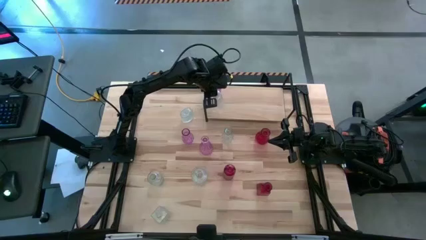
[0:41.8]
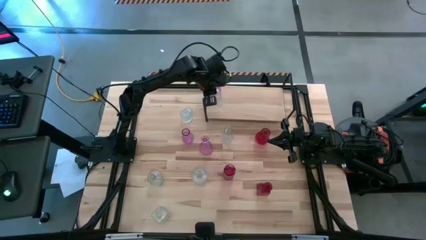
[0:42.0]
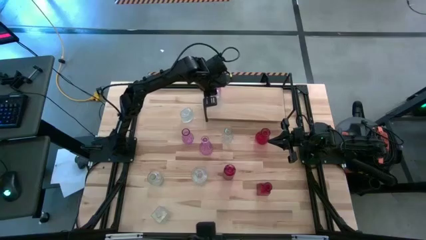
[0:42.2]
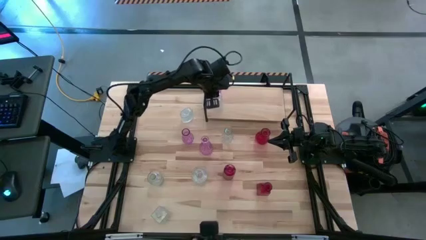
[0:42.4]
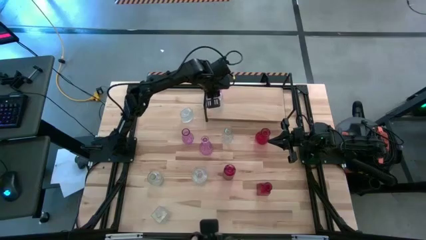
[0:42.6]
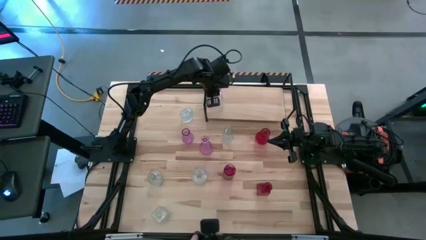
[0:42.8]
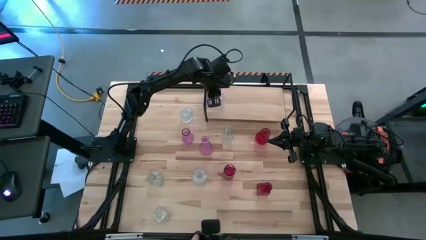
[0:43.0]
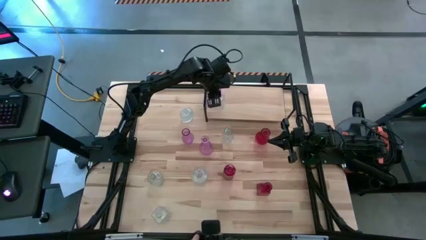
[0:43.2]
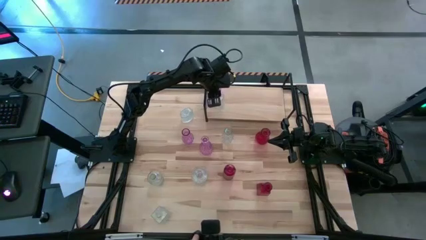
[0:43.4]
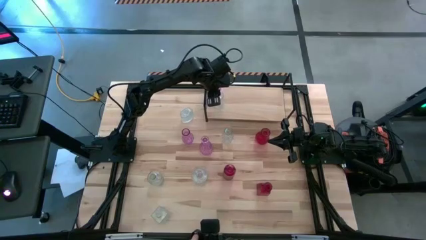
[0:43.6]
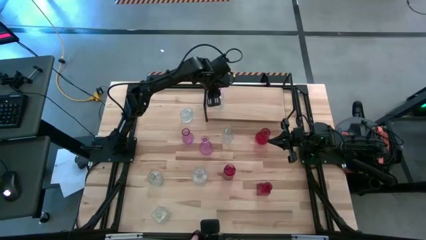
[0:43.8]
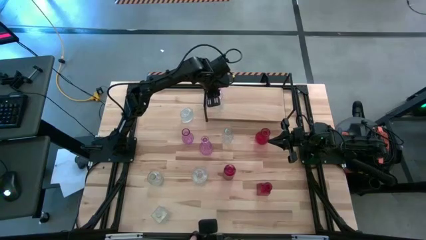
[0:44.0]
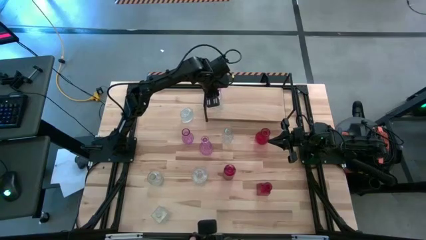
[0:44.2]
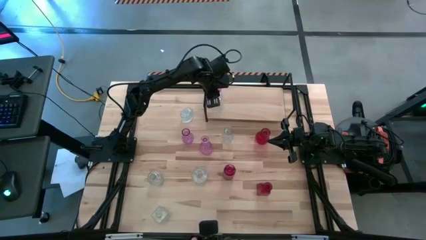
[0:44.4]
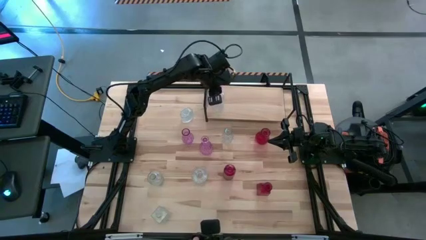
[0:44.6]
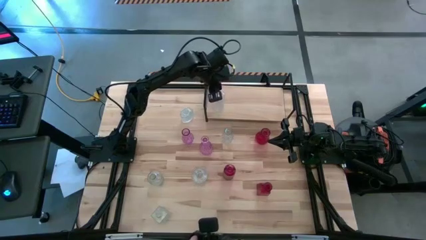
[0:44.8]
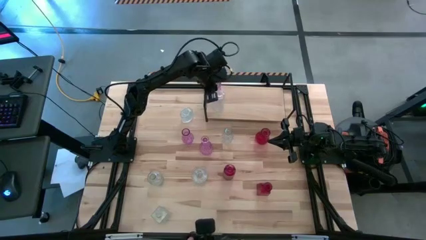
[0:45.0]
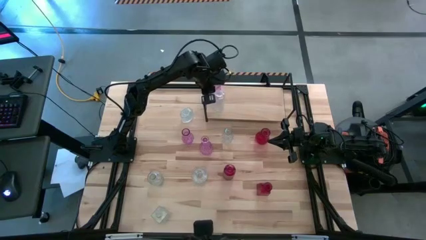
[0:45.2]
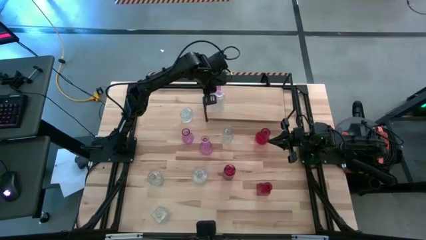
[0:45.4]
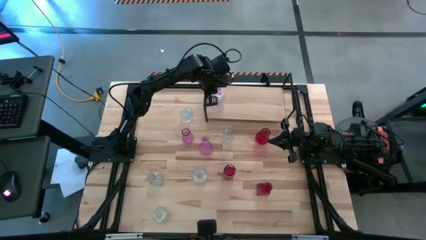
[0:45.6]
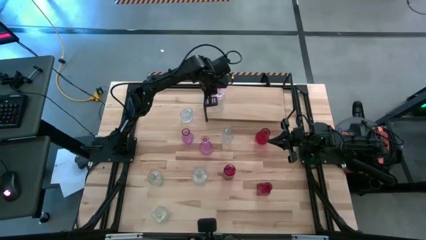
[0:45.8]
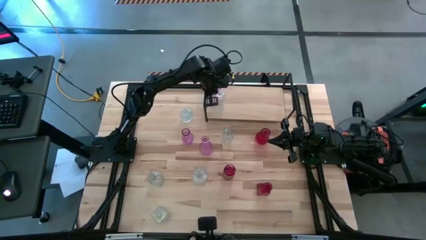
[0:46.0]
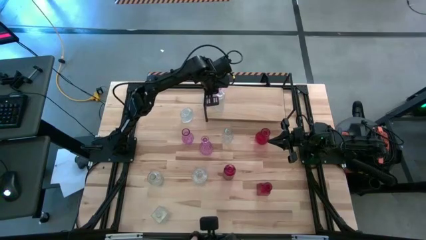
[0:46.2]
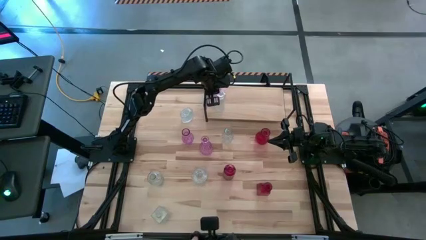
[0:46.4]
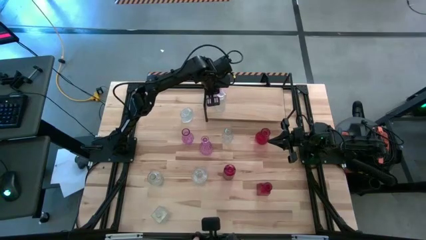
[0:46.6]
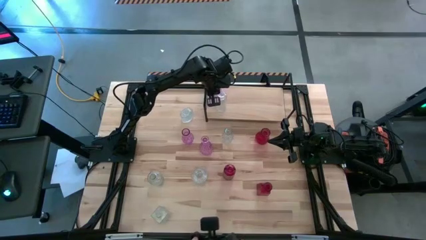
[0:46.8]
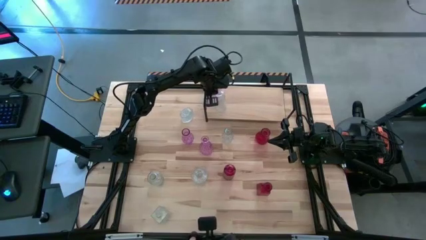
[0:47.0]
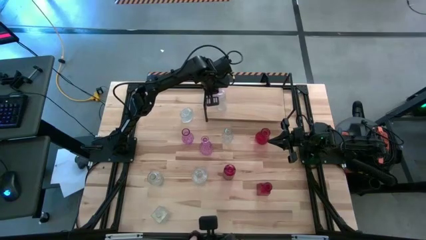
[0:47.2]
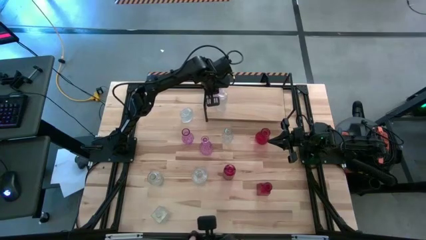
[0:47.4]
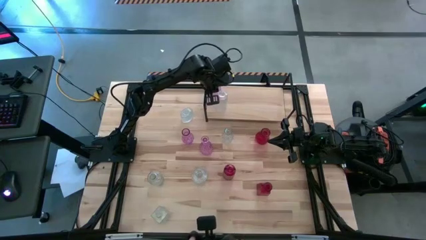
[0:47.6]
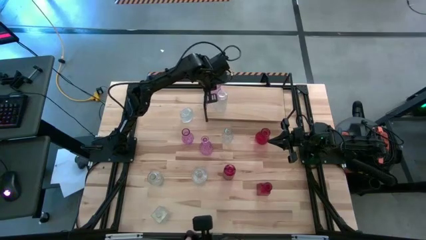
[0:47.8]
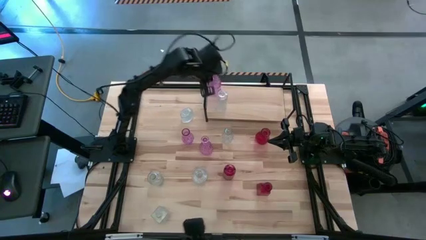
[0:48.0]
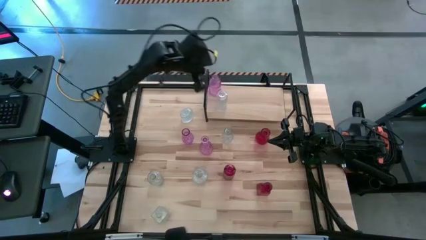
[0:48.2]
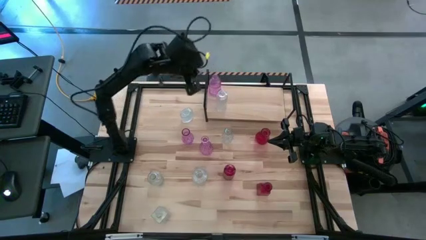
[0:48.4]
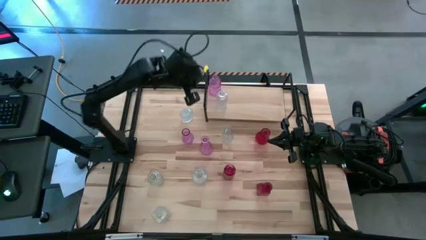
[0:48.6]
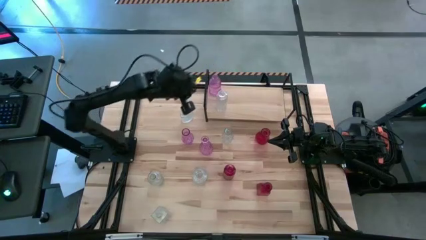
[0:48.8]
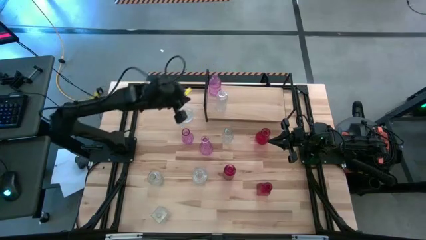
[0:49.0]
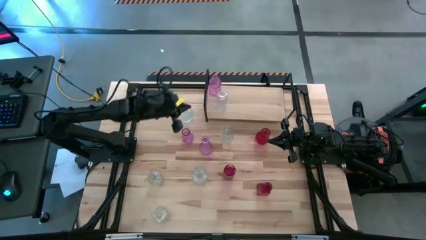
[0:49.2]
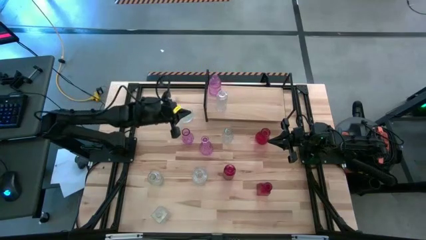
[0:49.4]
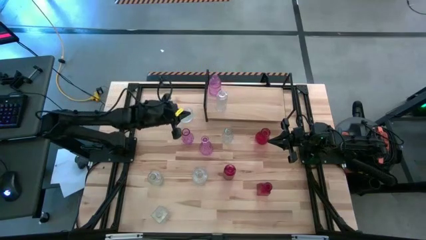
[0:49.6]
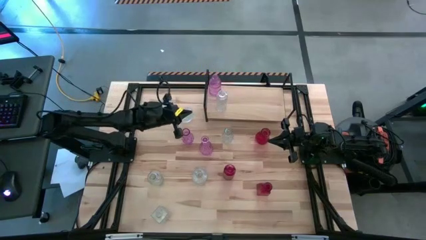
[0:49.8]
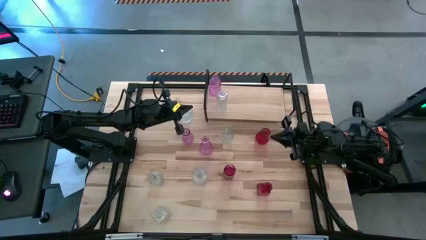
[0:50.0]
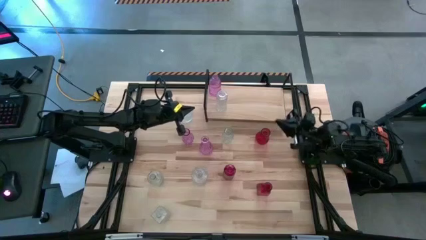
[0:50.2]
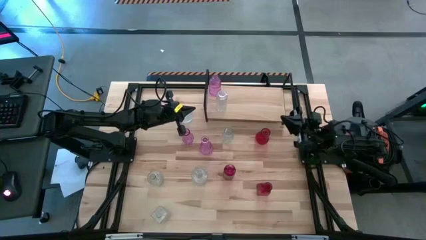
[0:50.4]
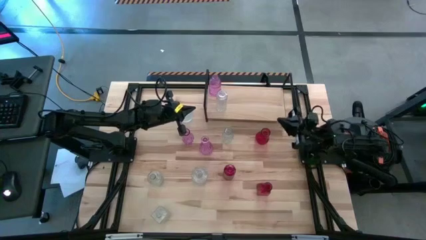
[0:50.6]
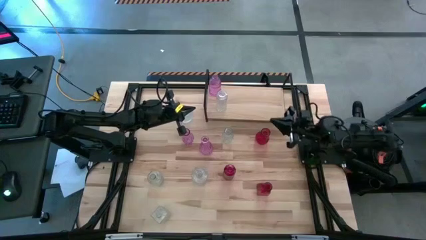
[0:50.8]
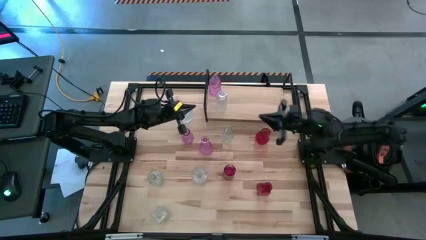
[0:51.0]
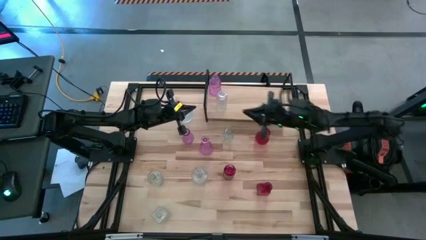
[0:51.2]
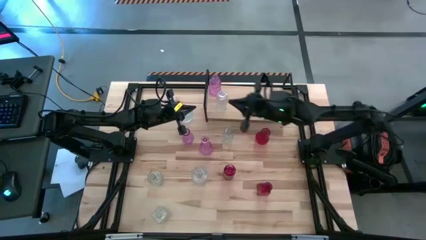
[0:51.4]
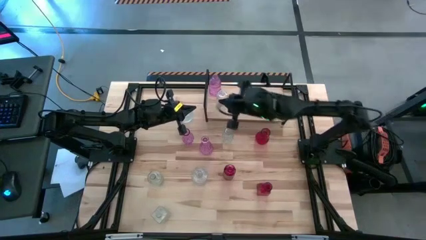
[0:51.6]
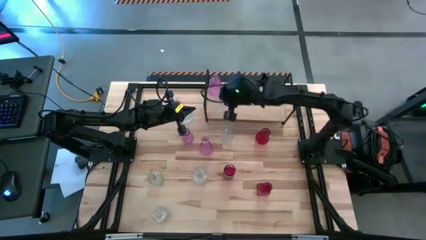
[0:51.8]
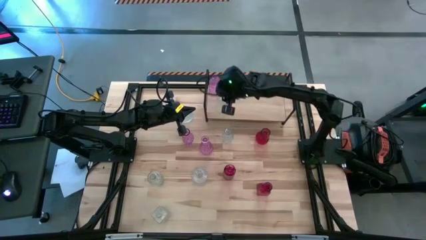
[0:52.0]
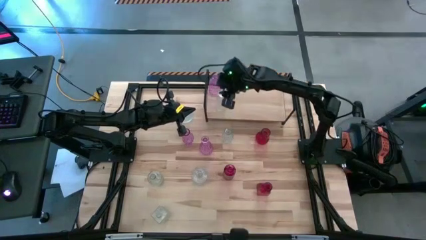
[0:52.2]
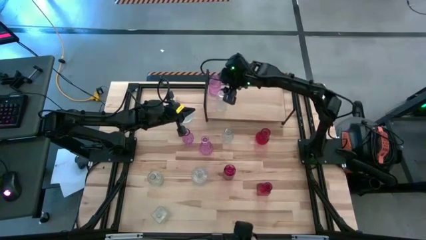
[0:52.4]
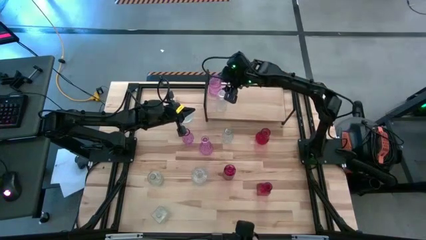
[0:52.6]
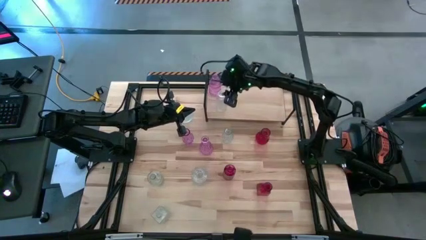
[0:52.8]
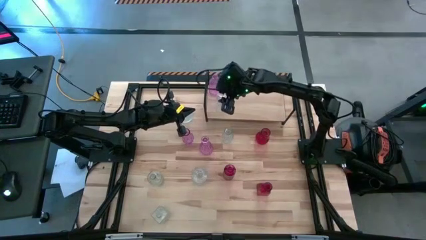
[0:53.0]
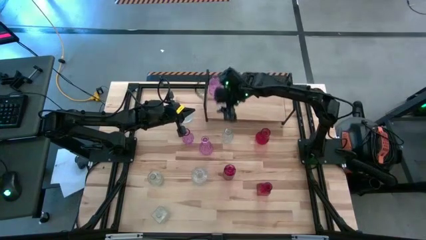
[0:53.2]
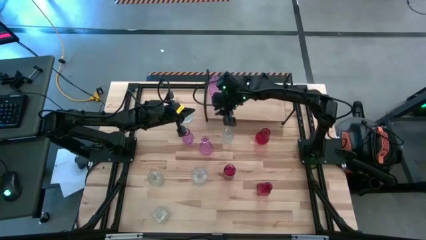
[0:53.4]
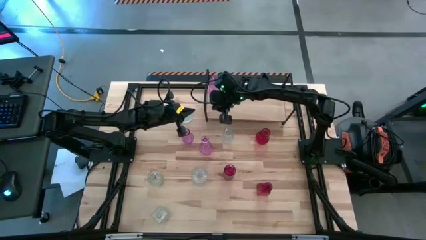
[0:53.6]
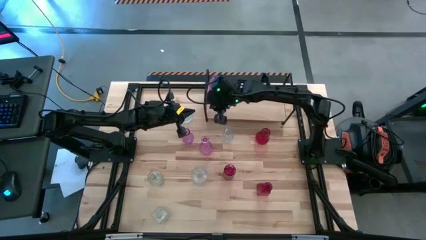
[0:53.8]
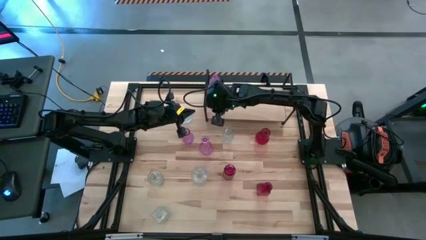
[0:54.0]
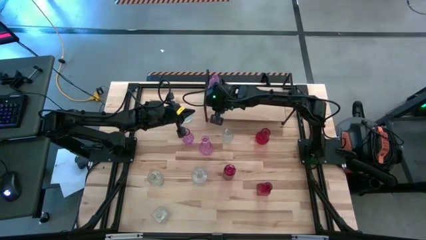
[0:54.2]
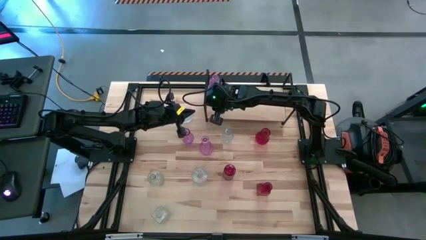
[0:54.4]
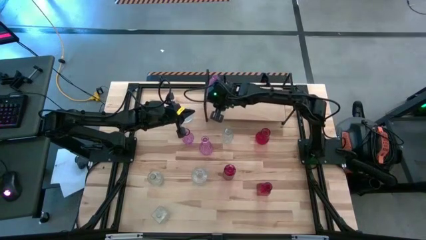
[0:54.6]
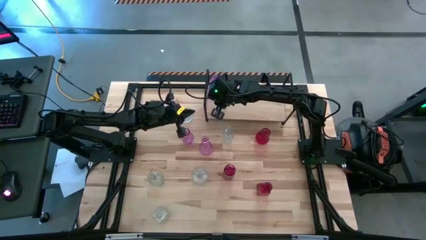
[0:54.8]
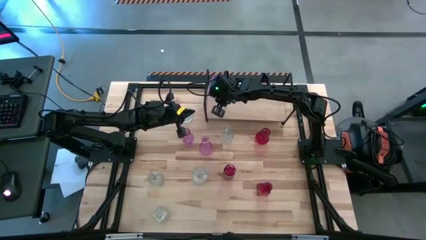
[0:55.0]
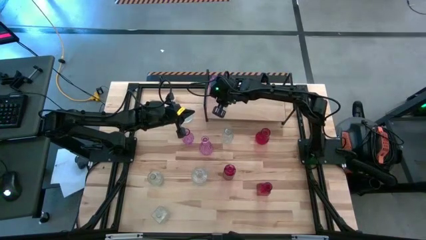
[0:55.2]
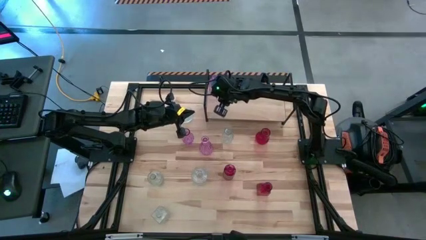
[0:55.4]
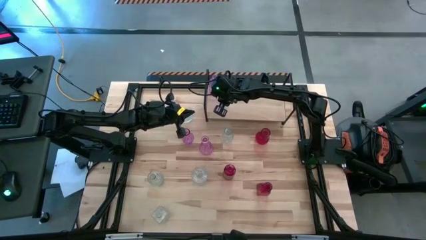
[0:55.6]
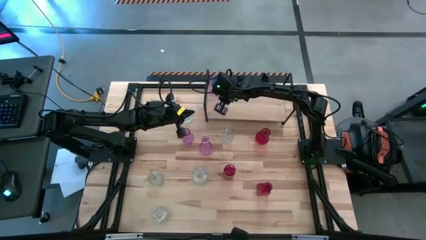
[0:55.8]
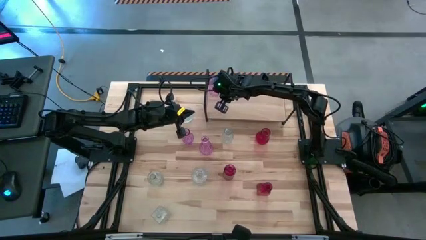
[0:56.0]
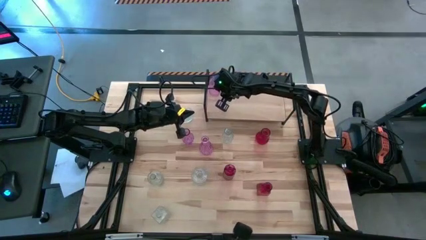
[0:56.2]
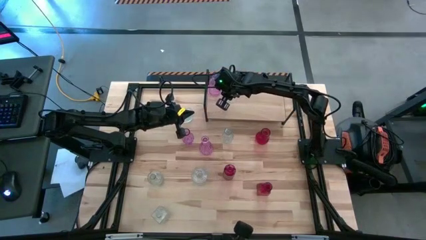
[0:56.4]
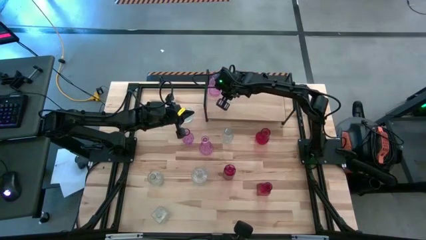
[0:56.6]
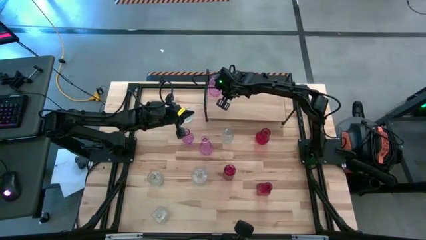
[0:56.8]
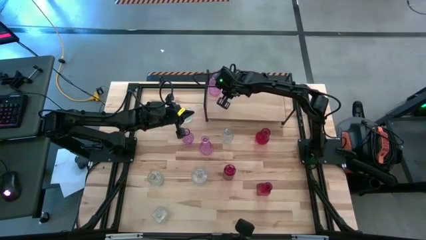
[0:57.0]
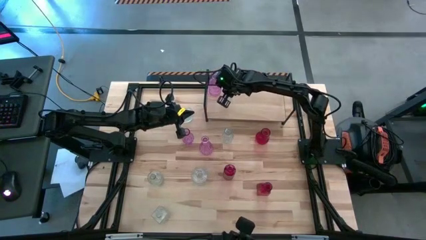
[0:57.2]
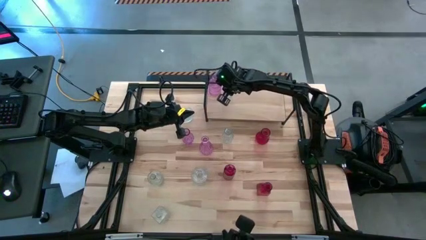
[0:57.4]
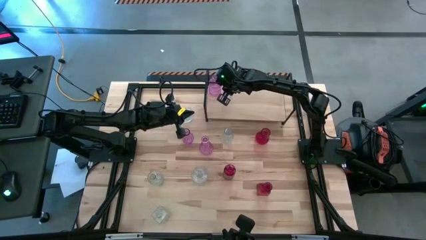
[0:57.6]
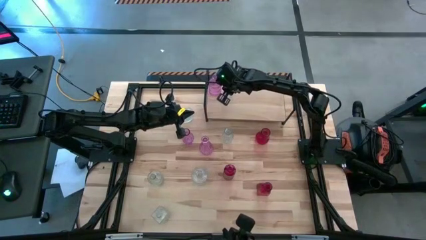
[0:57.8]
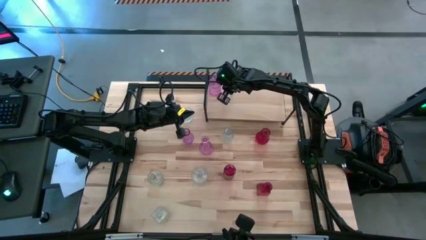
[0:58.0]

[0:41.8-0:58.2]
Task: sort vases onto shelf
Put the transparent vase on the shelf
